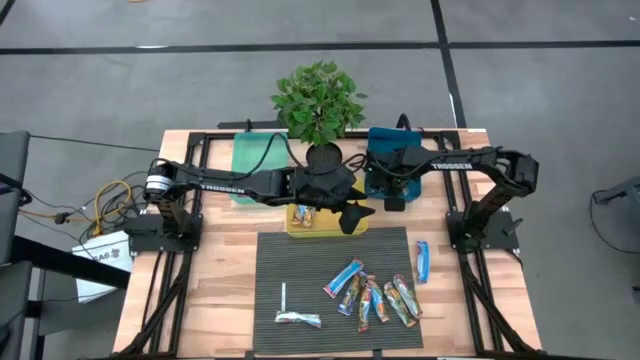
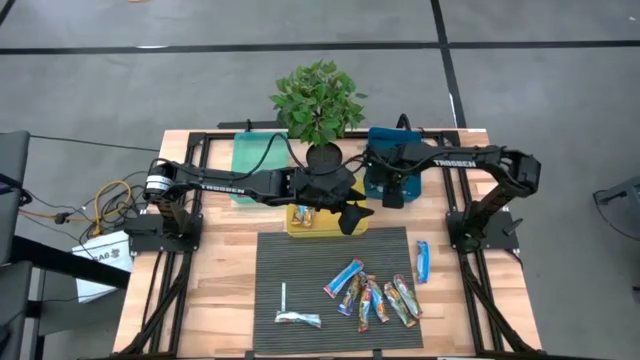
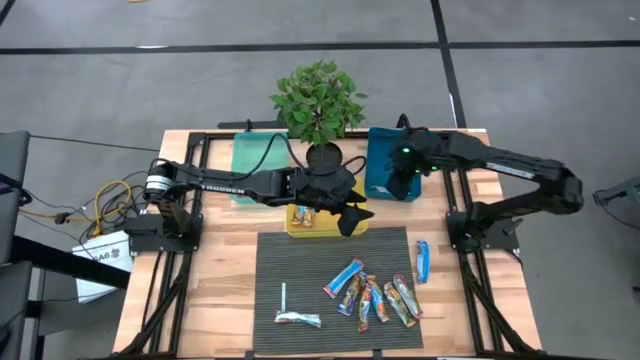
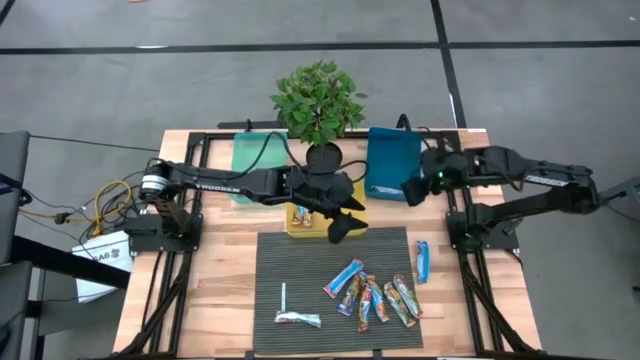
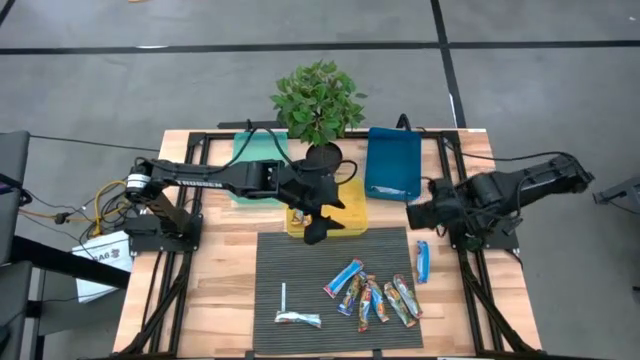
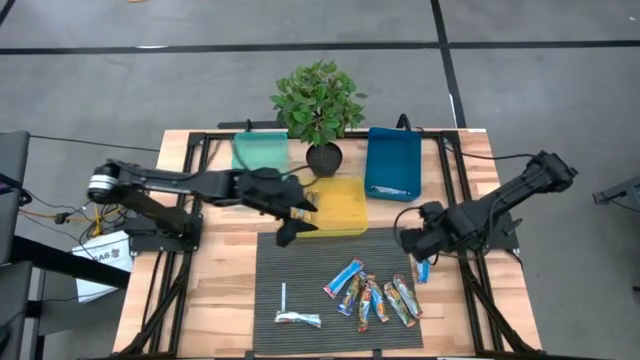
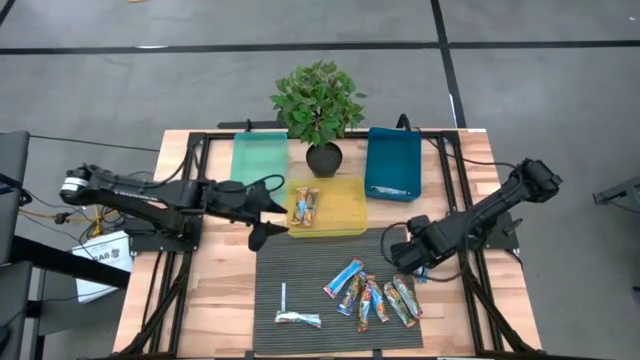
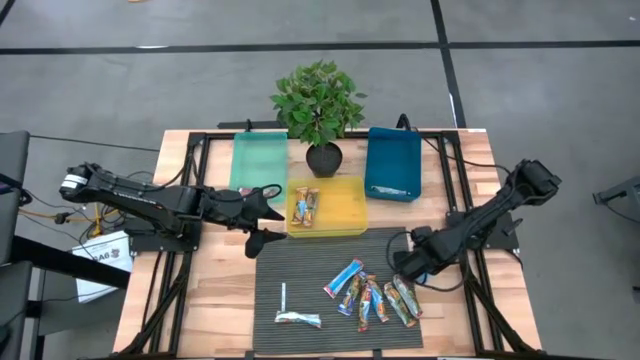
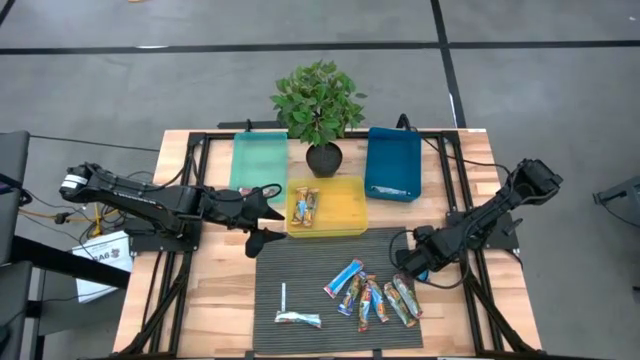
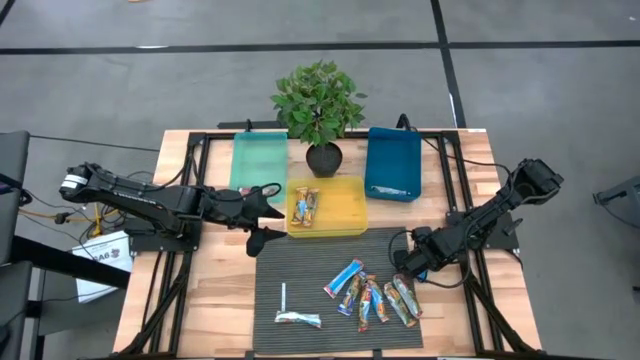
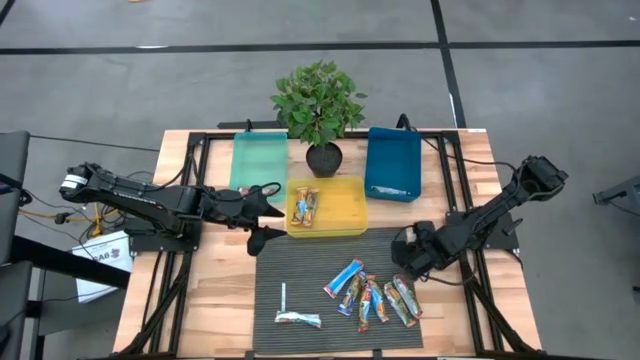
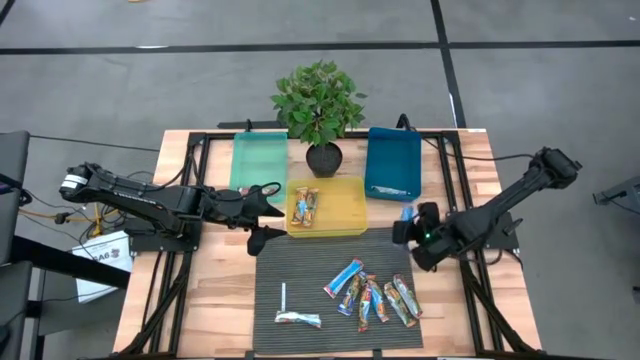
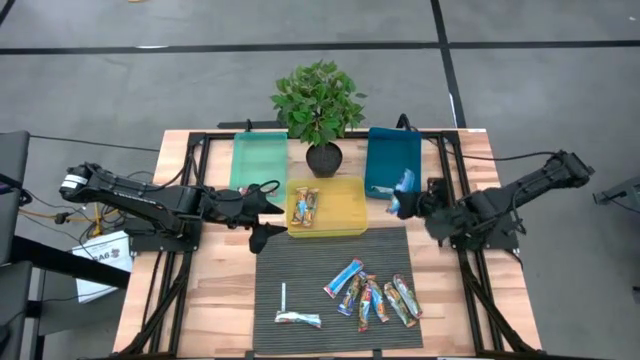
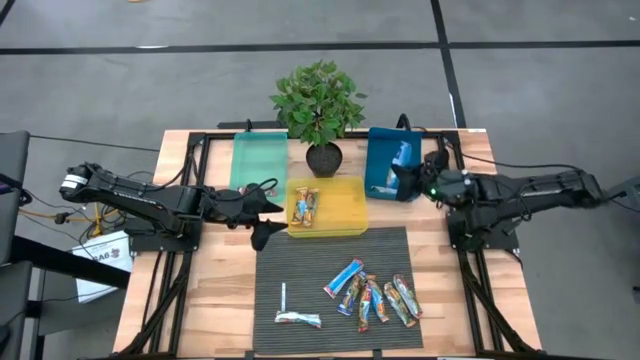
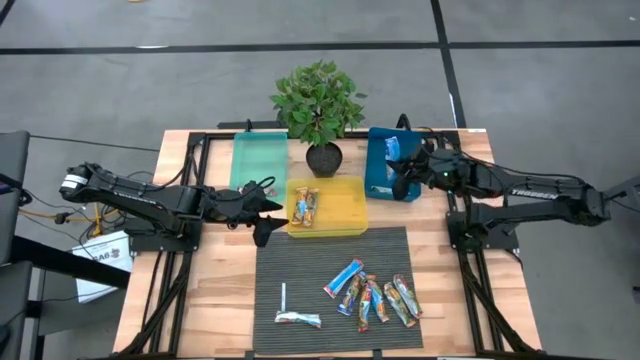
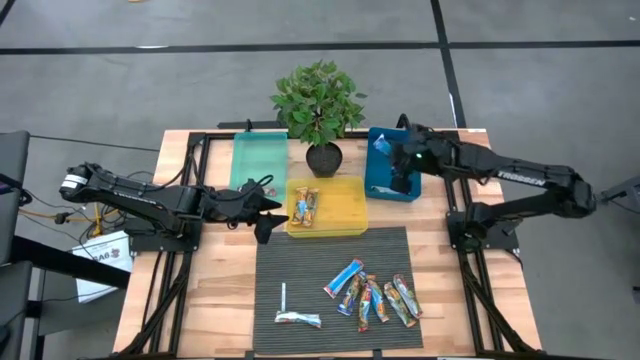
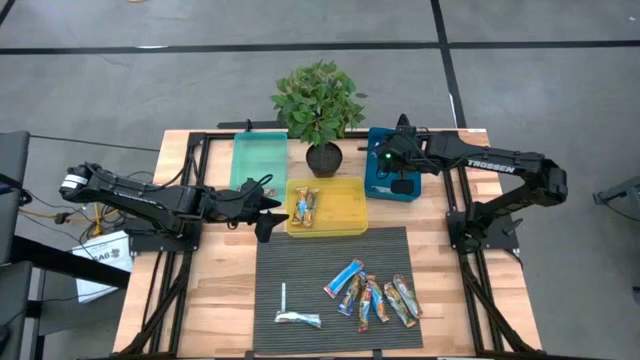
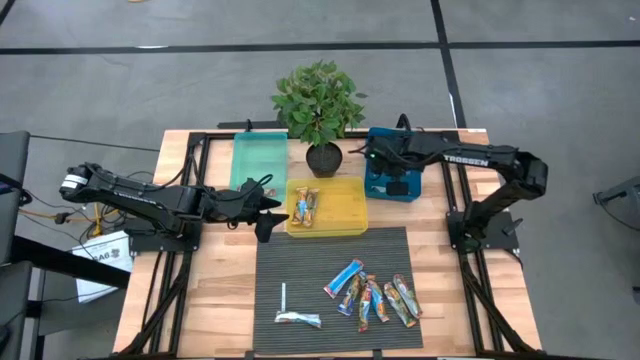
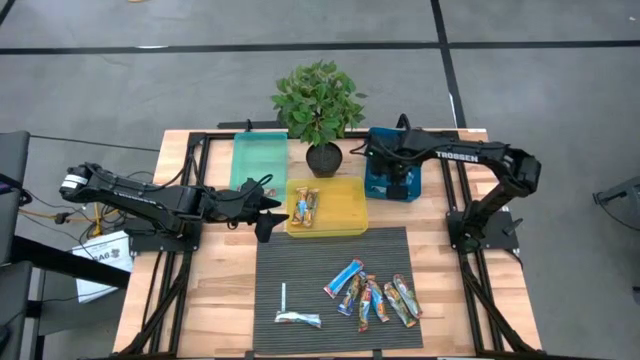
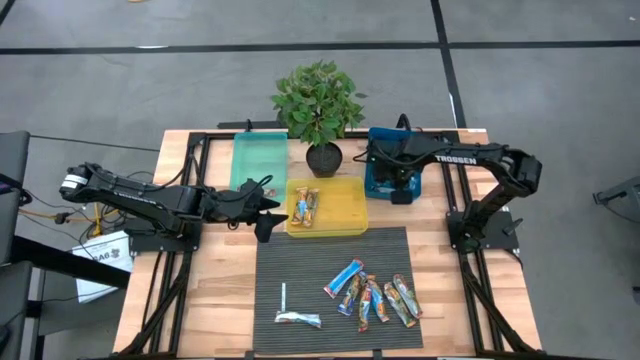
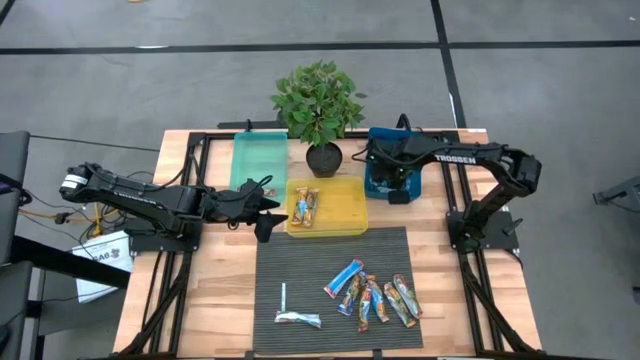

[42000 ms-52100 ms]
Task: Pick and place Granola Bars by type
Put the blue granola bar into the blue bin

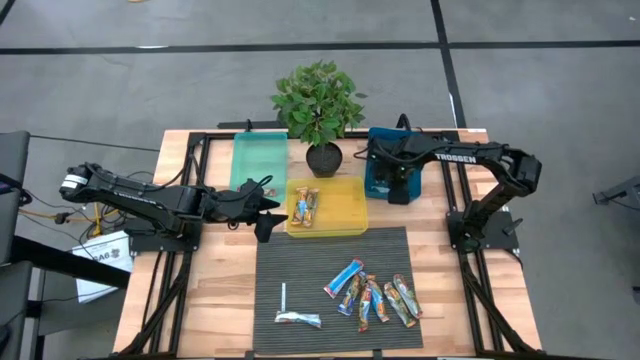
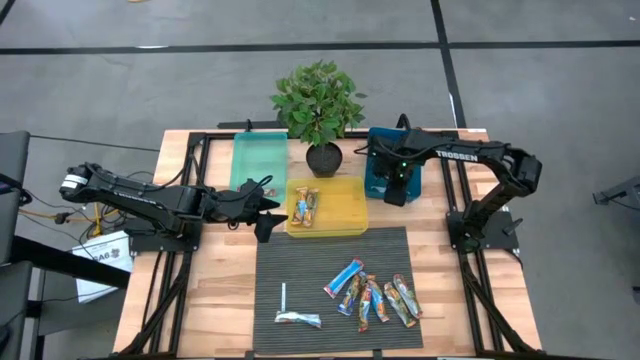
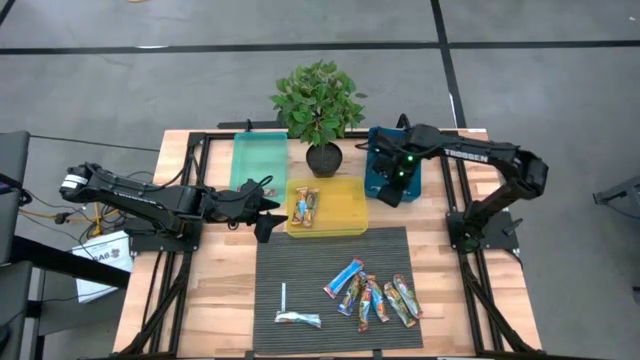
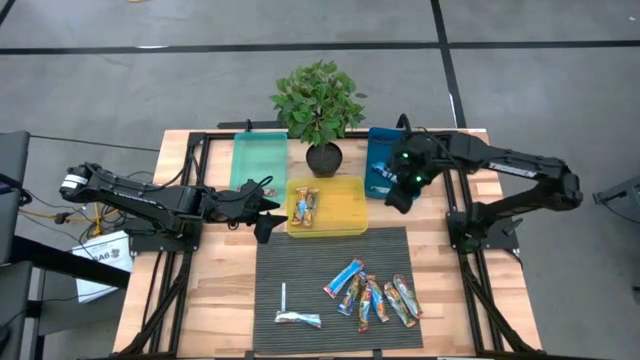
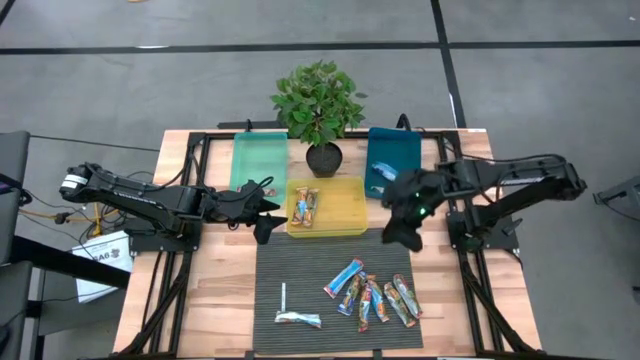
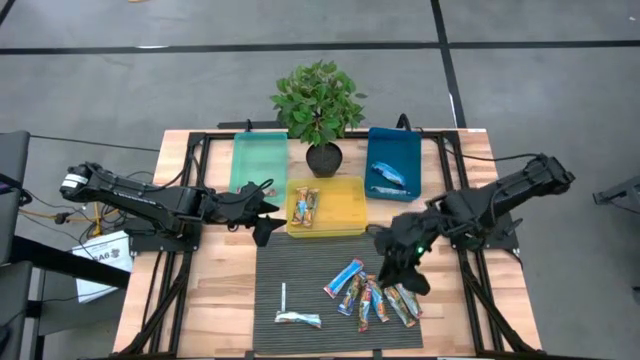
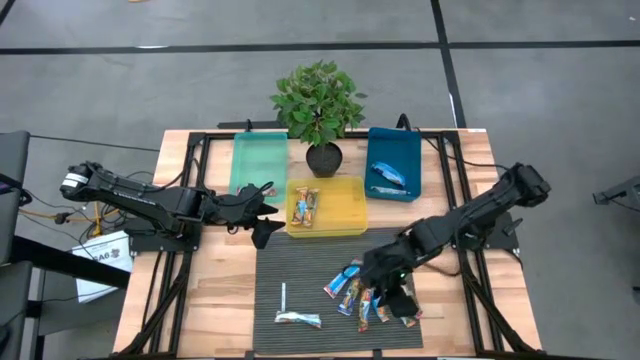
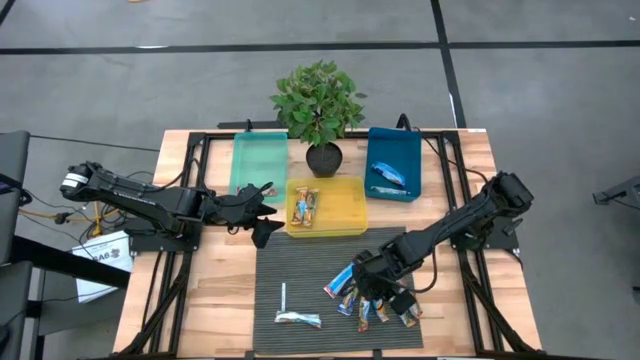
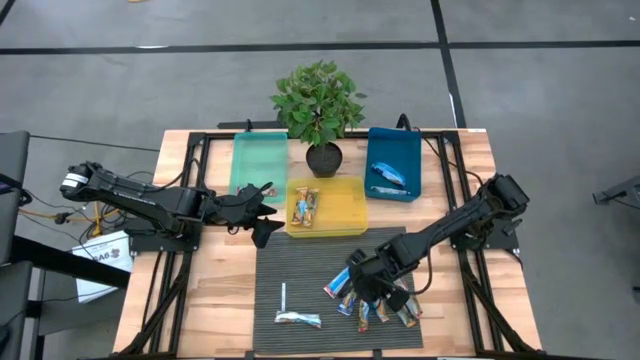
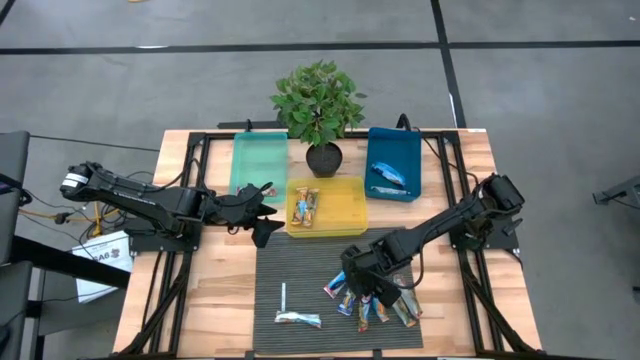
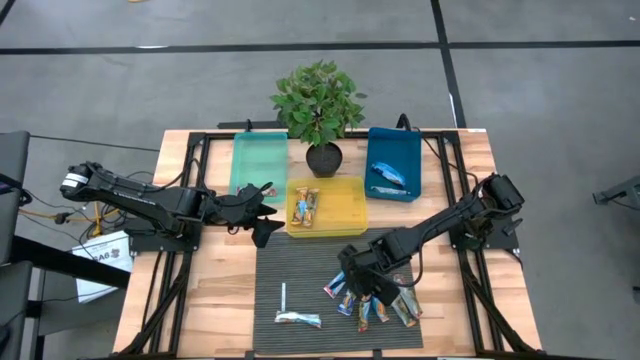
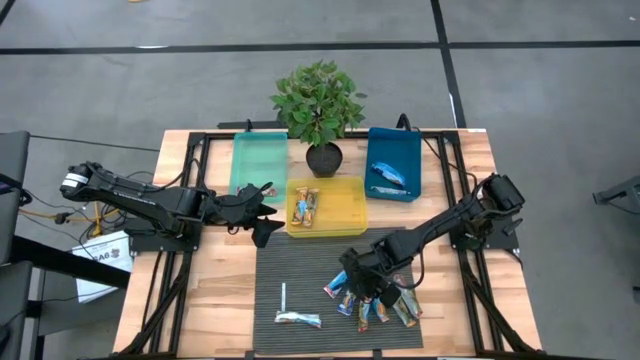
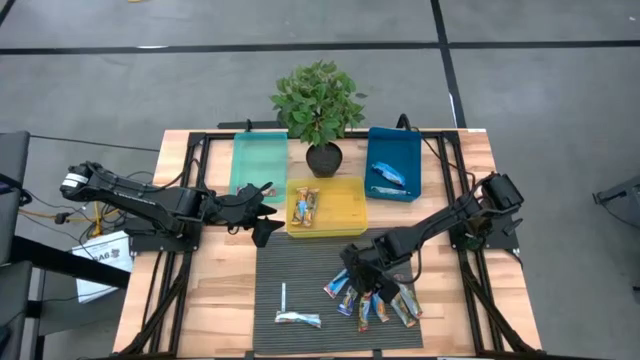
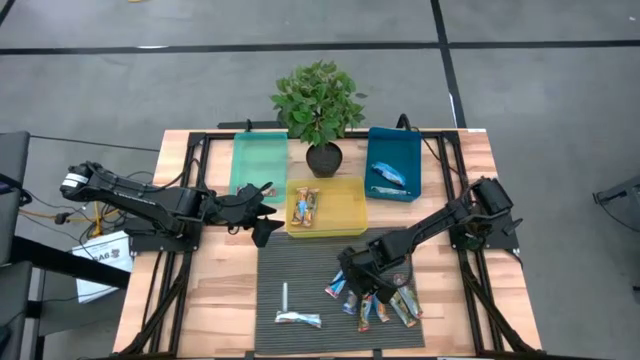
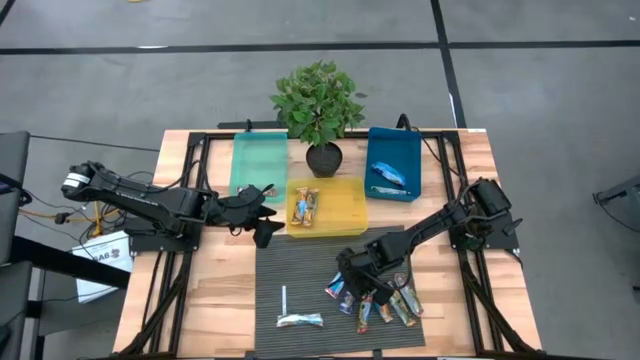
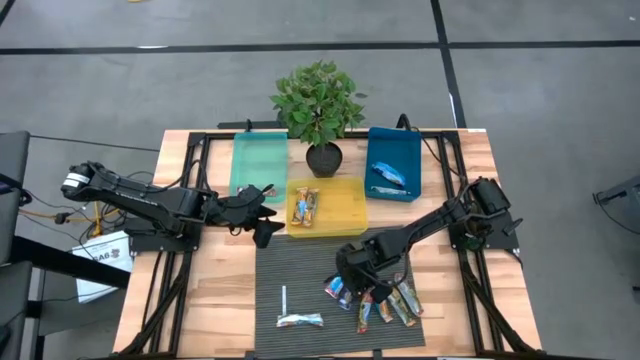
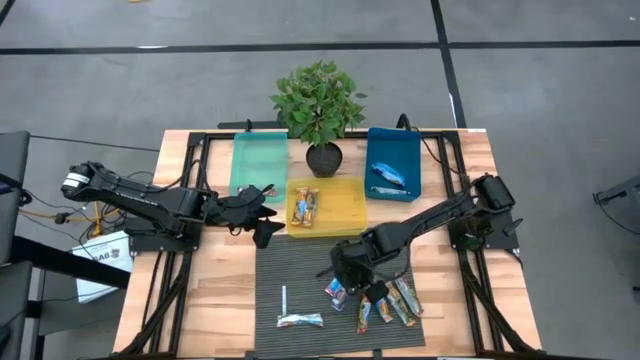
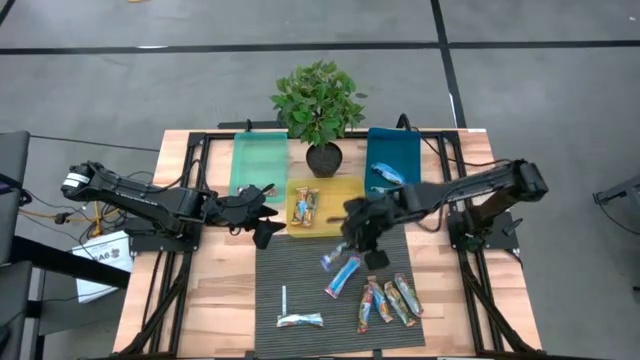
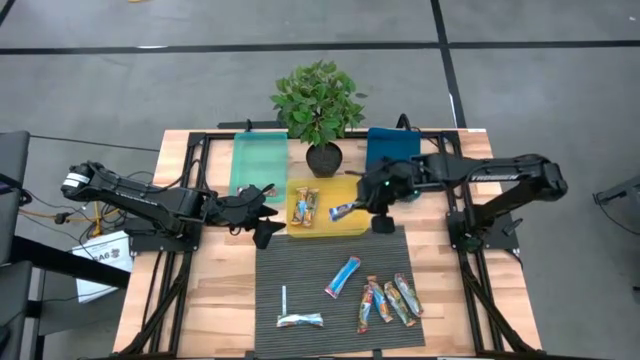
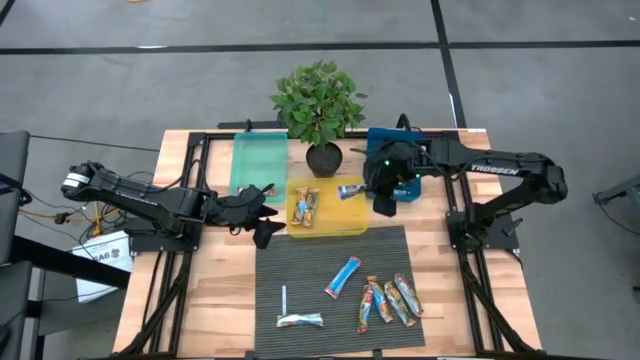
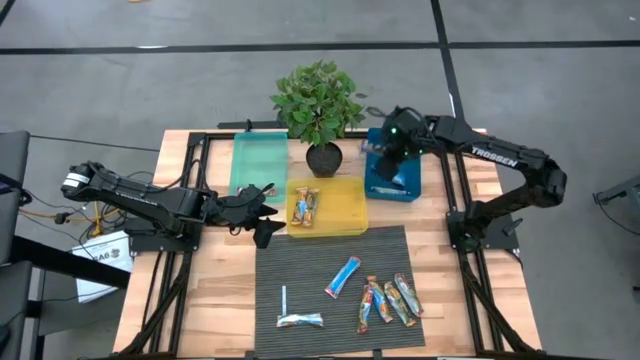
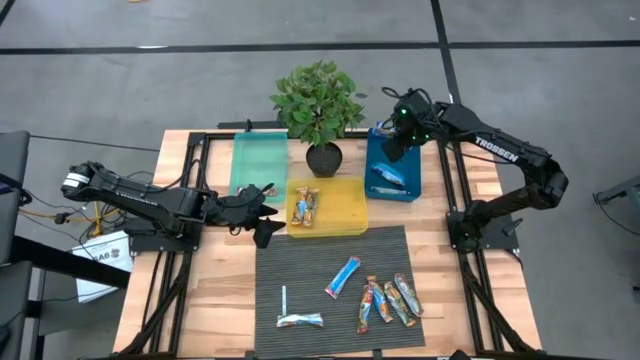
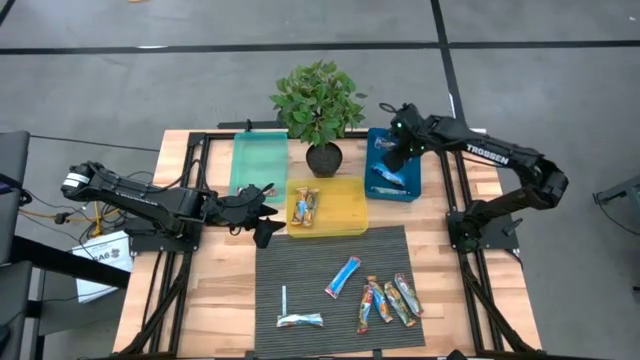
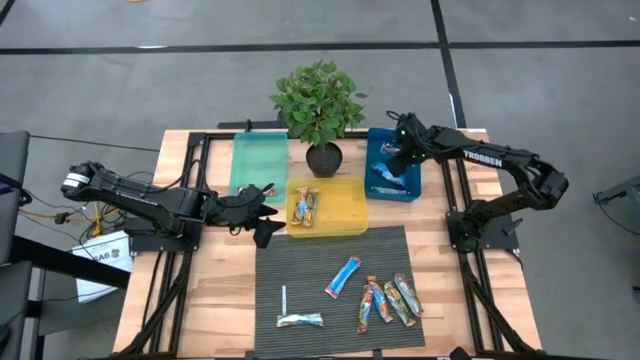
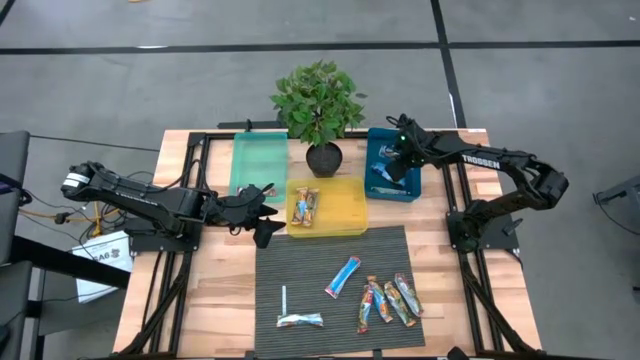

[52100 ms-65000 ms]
Put the blue granola bar into the blue bin
